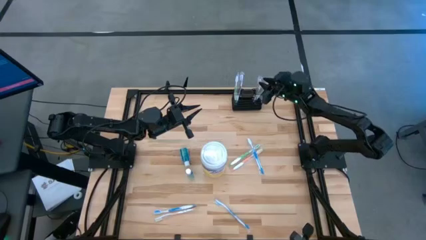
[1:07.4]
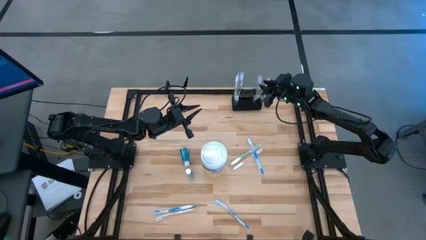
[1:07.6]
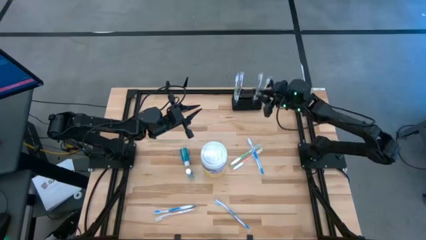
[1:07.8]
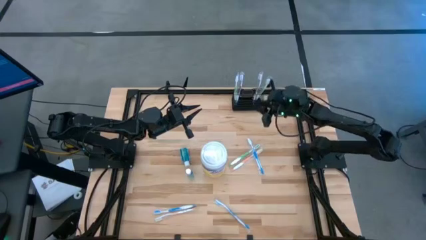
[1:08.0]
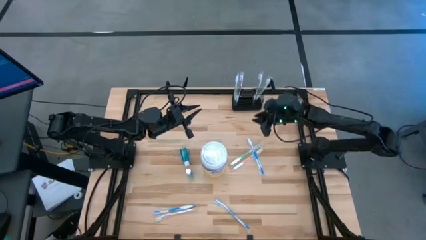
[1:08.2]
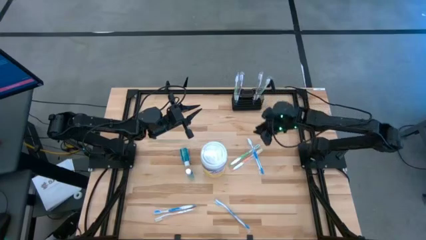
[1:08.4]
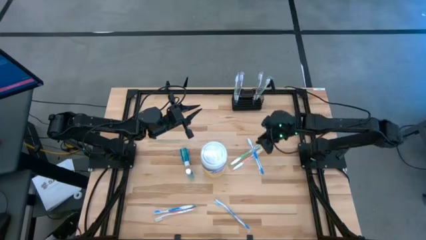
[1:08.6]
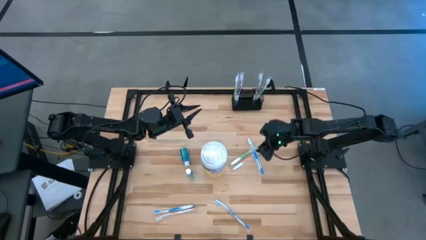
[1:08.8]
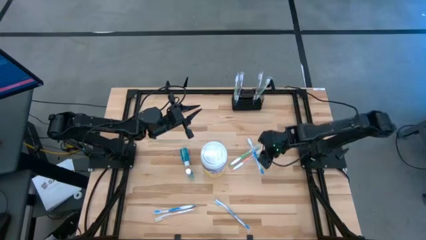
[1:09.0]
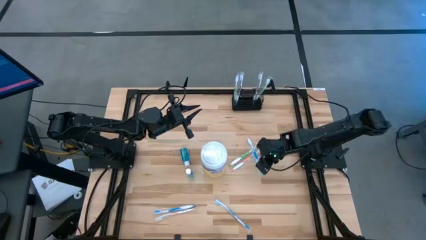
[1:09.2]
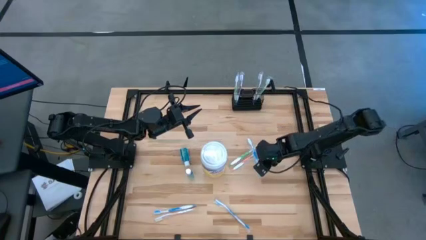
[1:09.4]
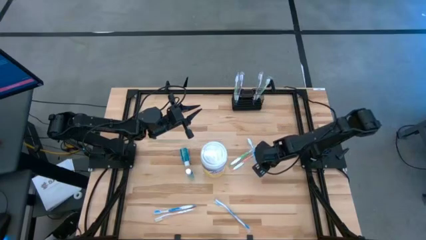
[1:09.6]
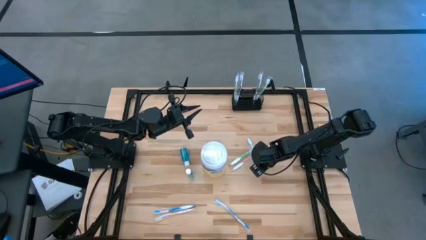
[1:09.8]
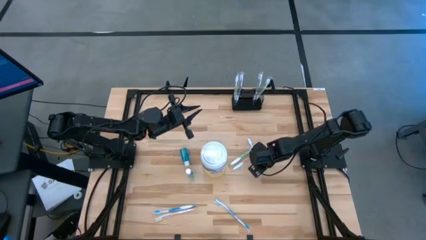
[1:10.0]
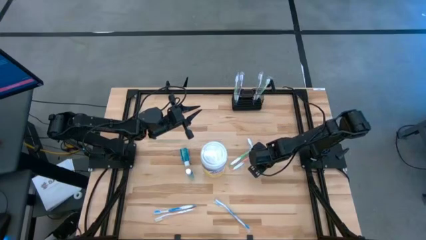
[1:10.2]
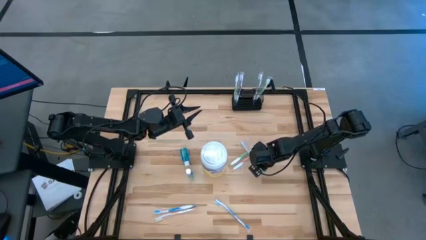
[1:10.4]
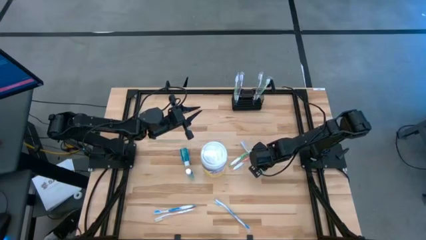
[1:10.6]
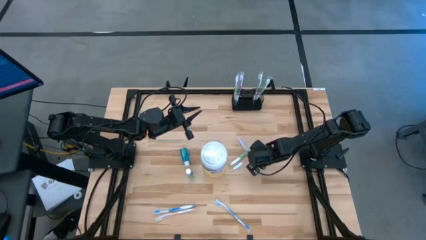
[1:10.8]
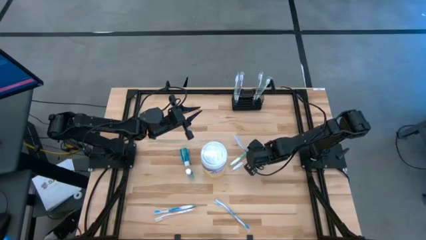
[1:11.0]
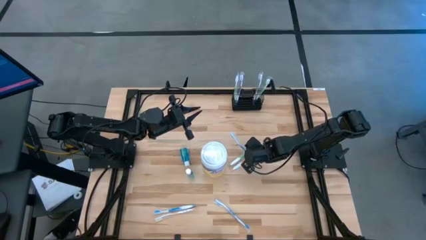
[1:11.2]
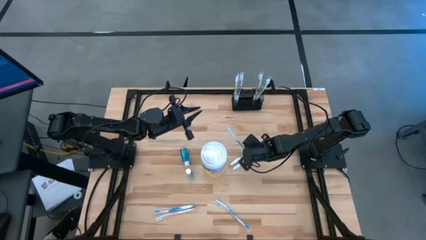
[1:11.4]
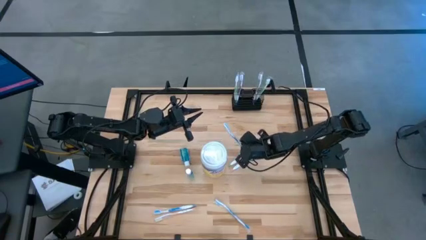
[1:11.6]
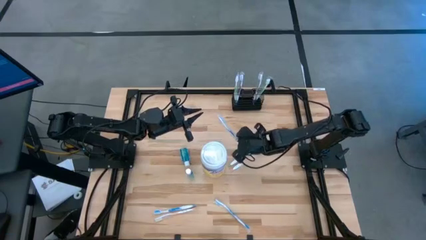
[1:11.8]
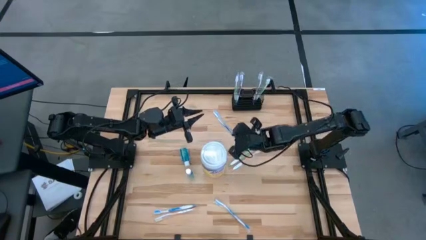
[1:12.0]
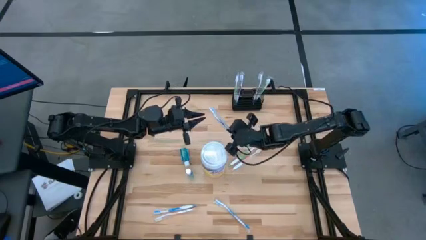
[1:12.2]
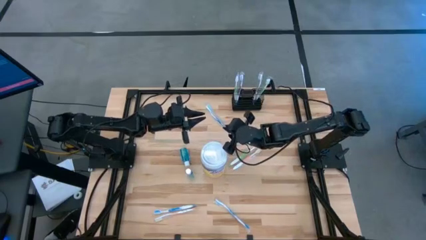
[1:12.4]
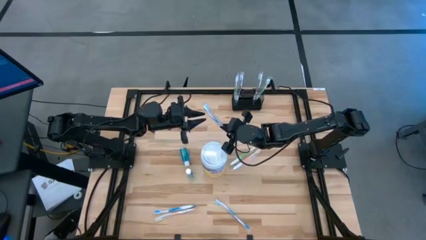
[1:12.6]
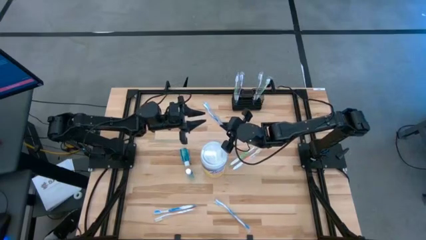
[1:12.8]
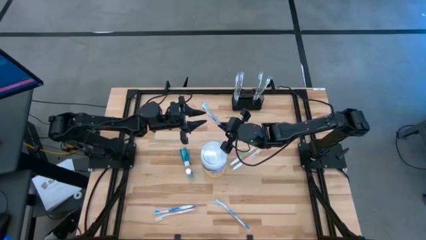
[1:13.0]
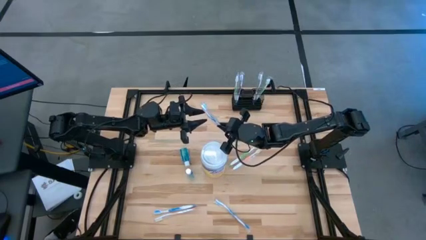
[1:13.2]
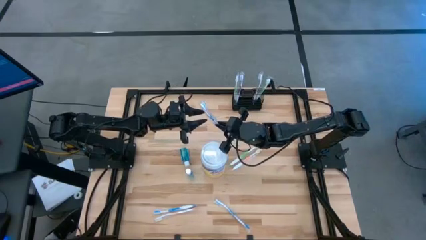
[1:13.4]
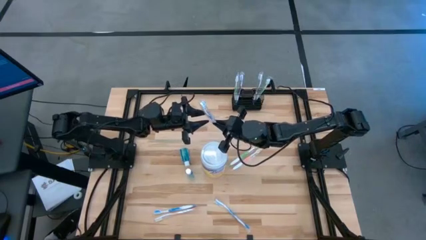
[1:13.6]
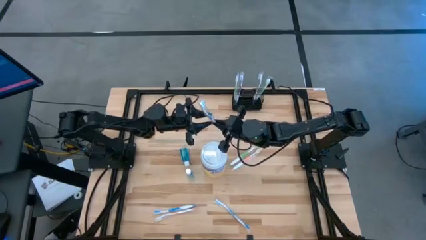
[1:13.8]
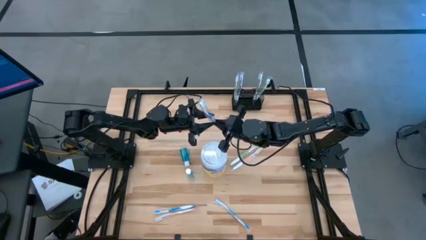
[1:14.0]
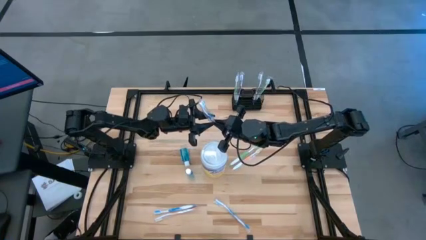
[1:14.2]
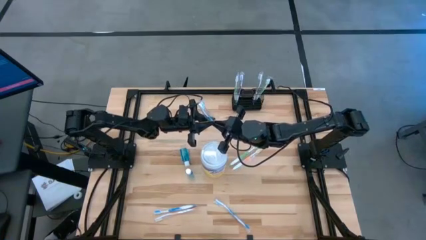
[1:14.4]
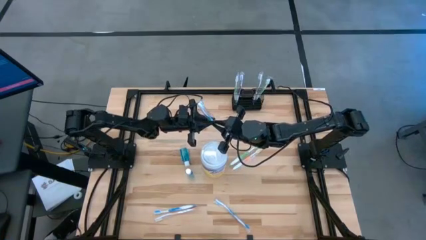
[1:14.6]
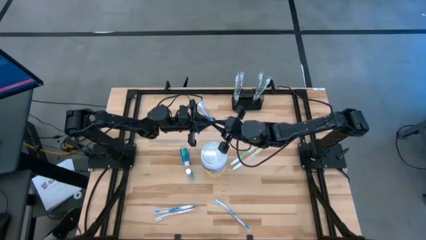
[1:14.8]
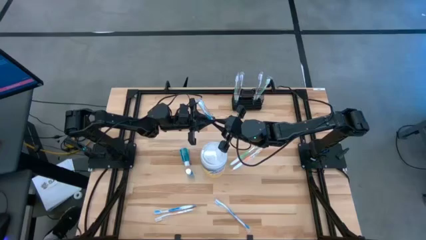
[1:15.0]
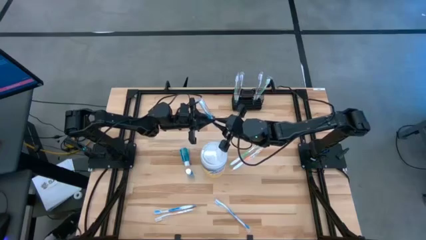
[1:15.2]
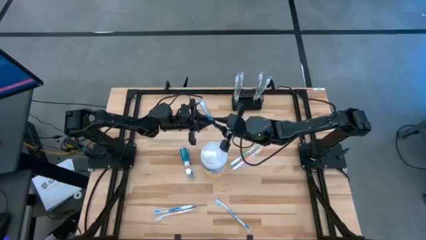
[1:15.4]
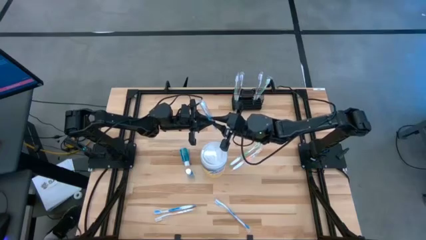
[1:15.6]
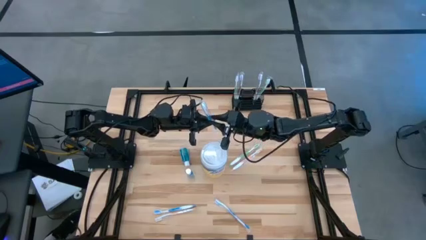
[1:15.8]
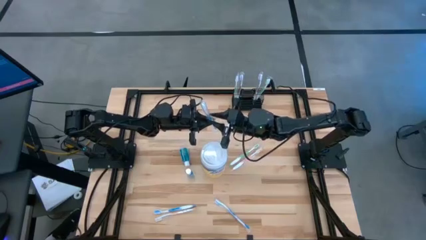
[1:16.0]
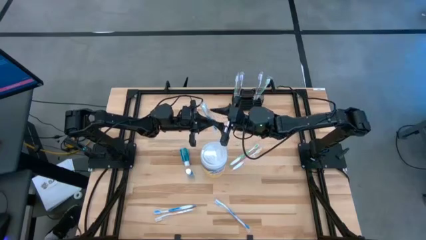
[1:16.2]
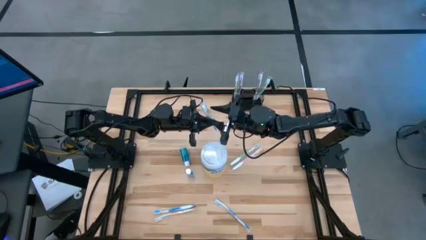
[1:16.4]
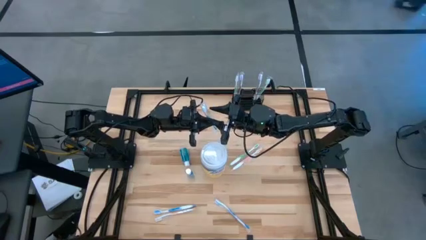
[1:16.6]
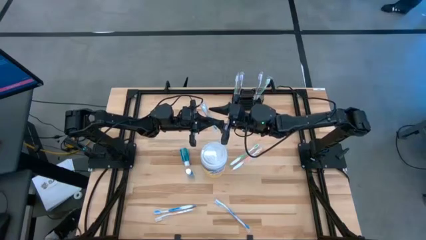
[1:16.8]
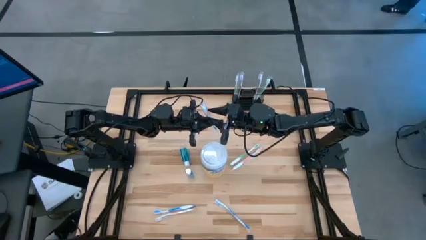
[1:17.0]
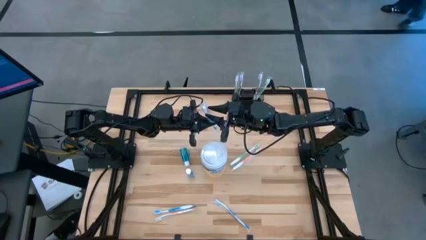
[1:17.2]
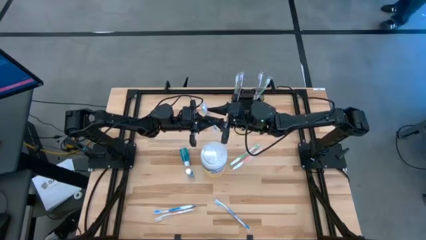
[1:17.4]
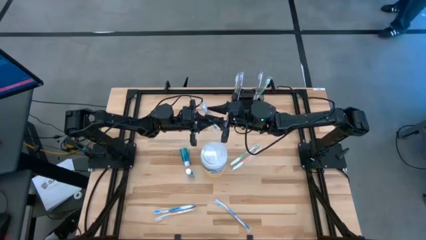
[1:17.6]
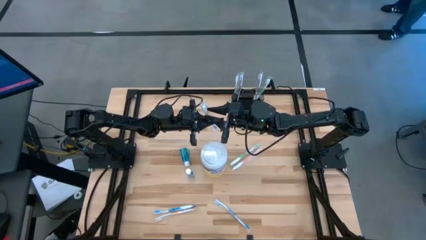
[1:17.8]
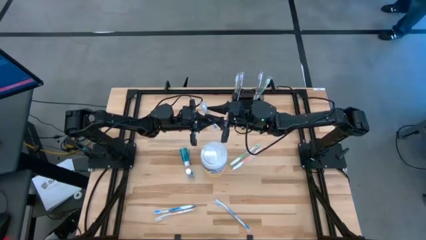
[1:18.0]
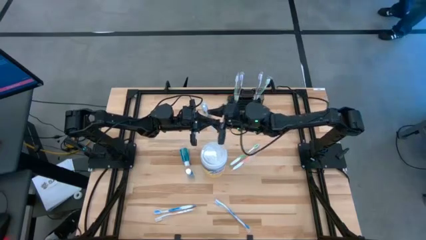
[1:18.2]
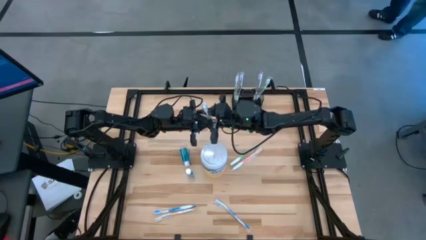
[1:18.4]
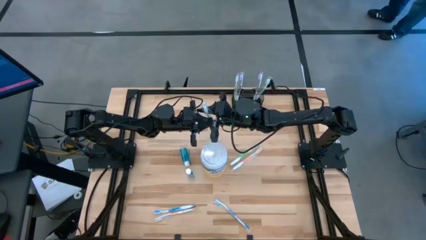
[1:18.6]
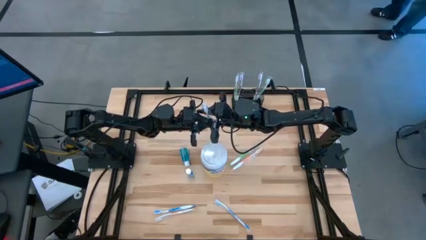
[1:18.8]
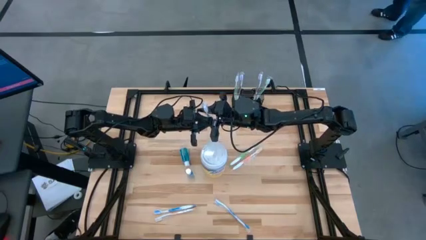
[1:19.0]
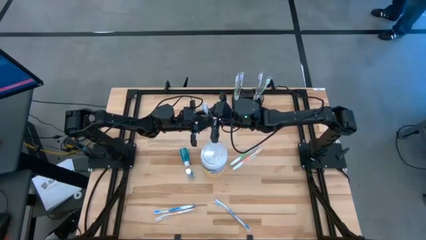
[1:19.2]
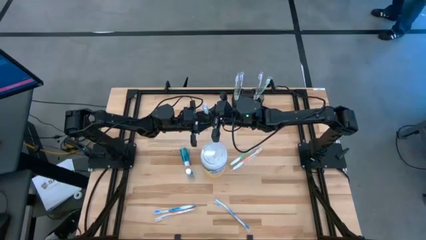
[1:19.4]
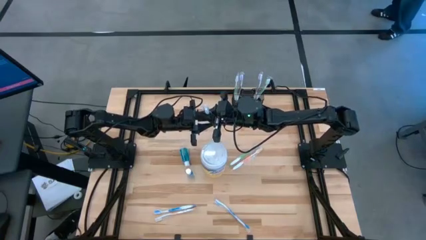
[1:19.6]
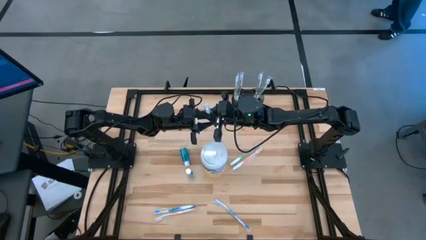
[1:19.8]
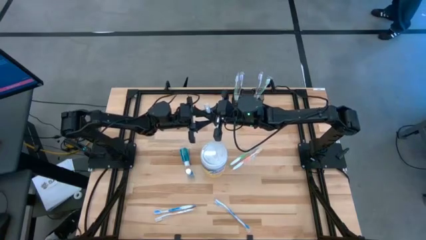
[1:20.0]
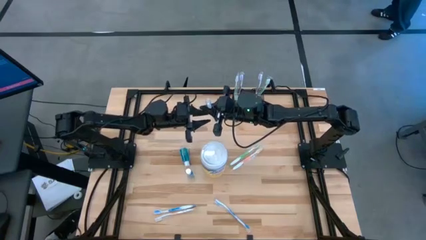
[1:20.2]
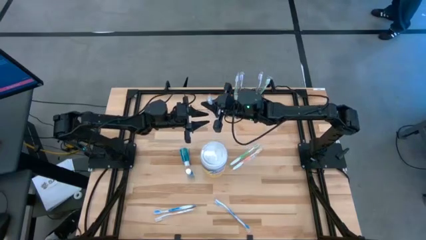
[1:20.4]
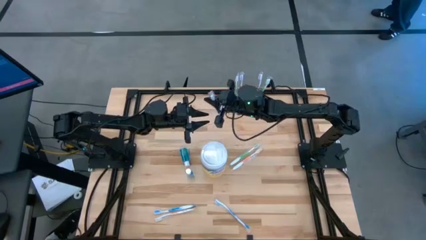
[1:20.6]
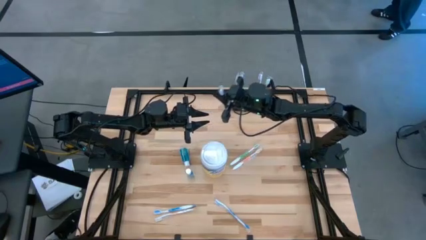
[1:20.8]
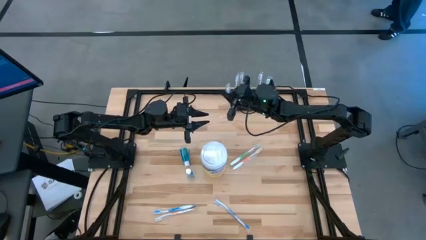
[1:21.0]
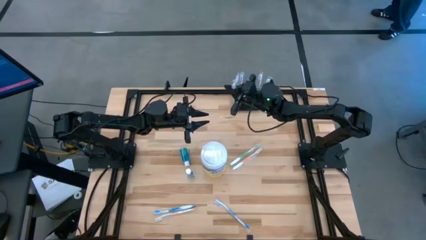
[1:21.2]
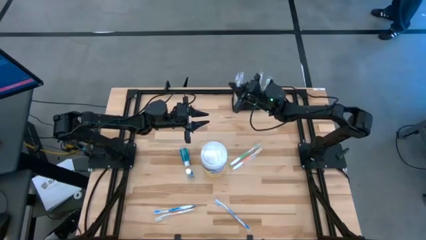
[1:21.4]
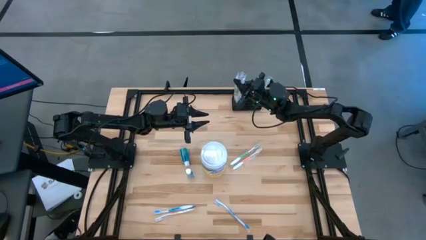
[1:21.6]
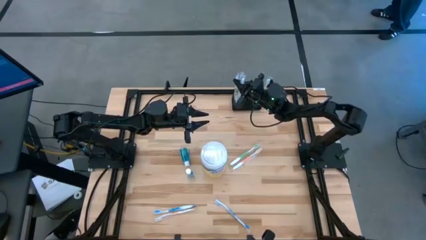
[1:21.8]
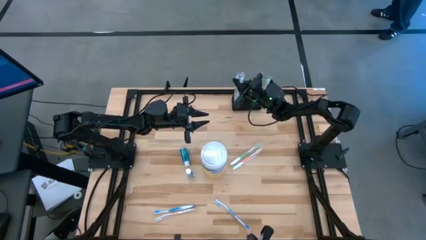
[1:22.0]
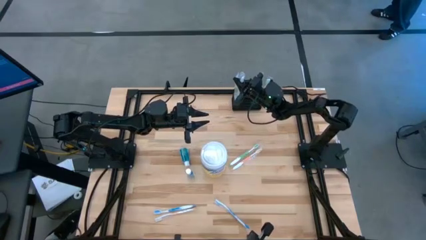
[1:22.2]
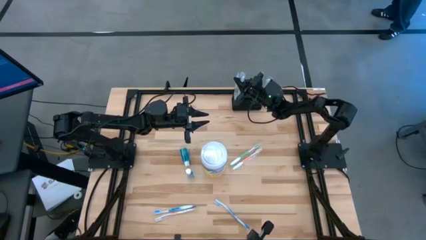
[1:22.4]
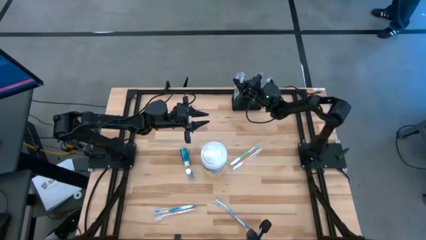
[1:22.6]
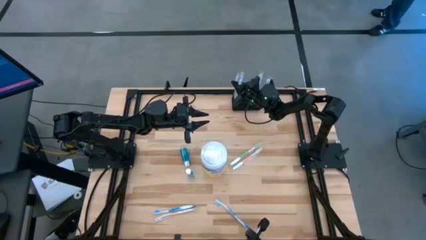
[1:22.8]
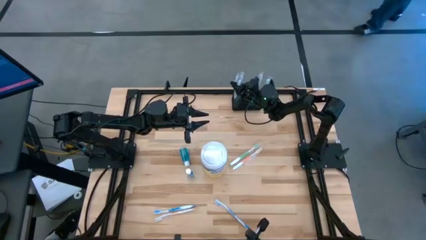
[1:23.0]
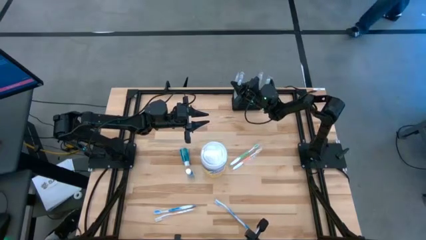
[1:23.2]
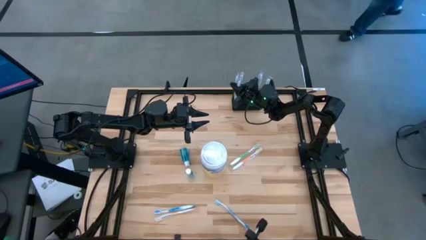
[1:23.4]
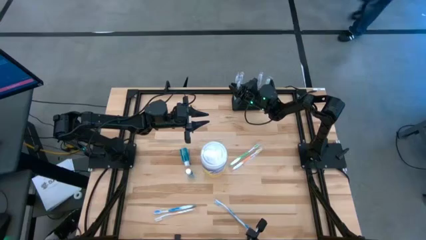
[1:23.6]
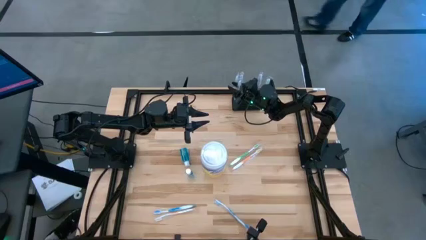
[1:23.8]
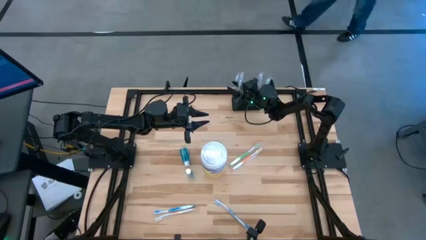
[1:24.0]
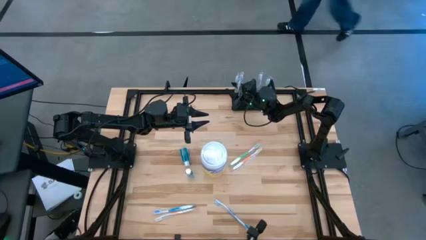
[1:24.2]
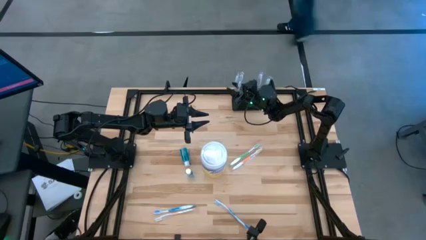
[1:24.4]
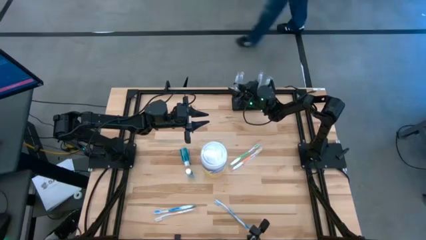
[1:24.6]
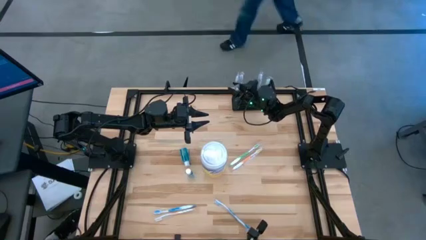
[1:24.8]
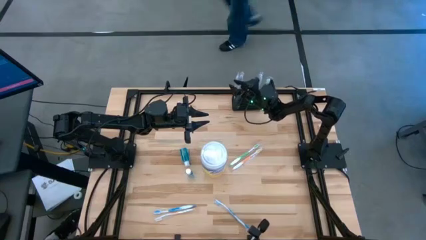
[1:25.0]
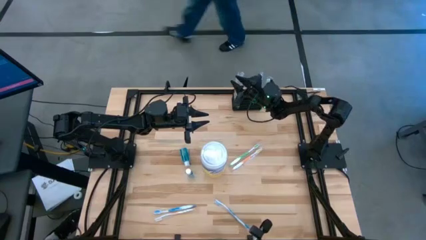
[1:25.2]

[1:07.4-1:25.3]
Task: Pick & Place toothbrushing station
Put the top right blue toothbrush into the black mesh organizer
